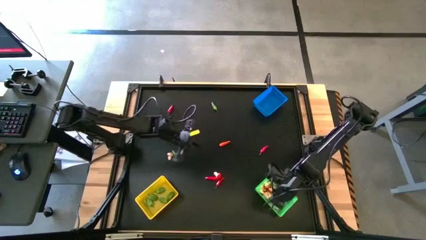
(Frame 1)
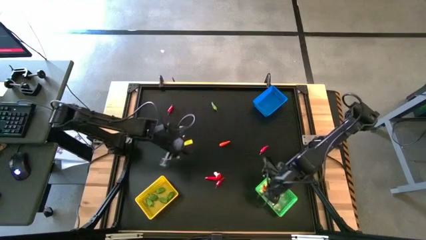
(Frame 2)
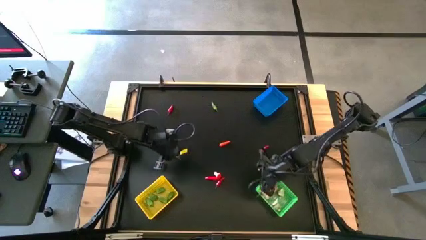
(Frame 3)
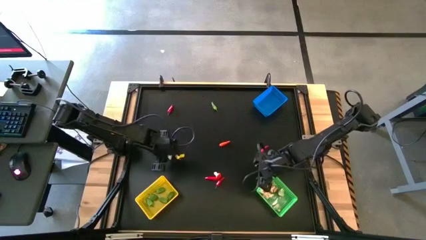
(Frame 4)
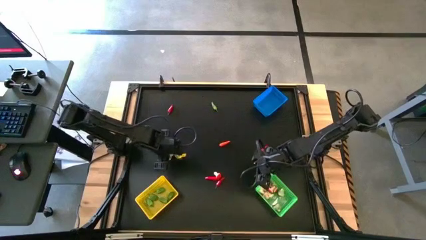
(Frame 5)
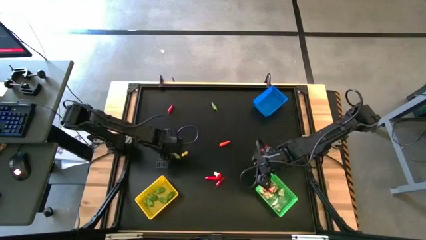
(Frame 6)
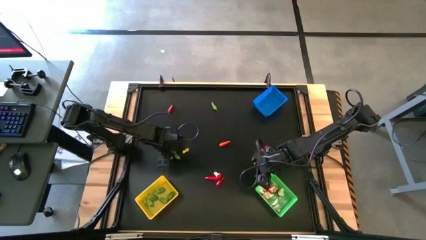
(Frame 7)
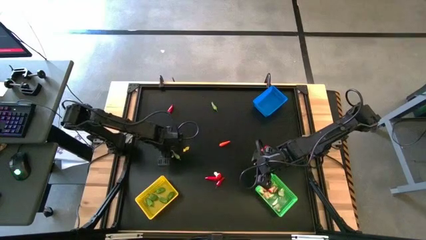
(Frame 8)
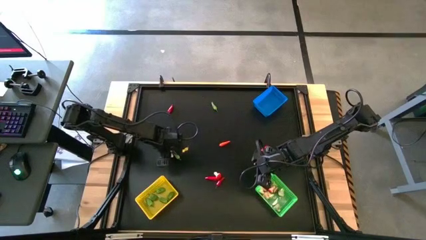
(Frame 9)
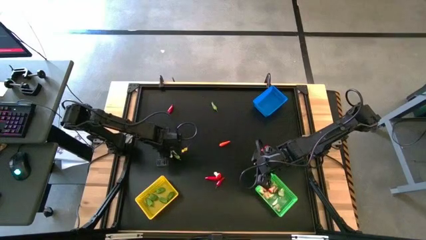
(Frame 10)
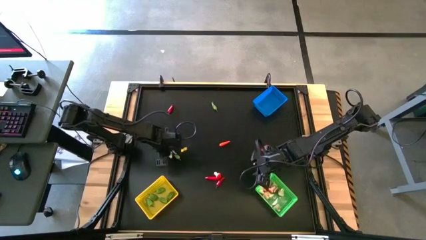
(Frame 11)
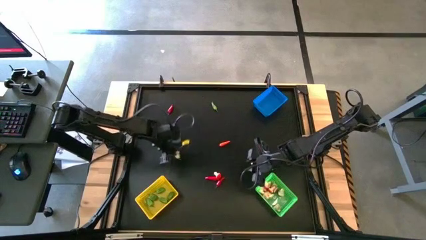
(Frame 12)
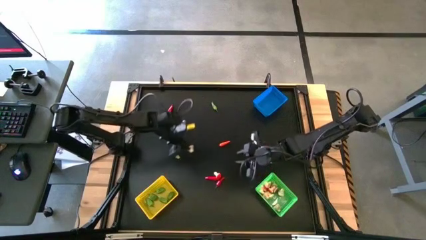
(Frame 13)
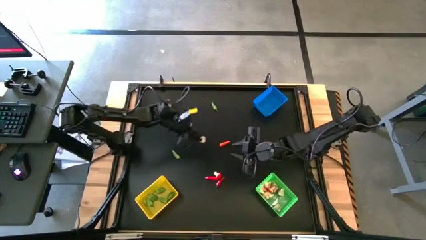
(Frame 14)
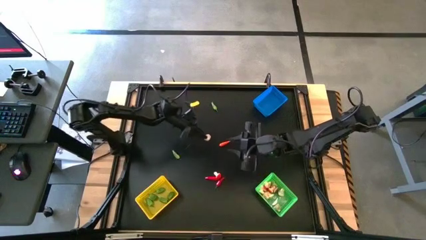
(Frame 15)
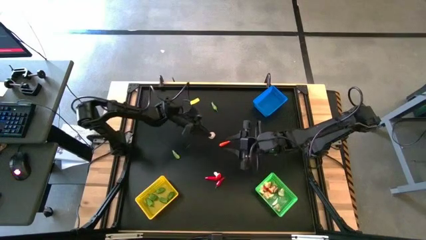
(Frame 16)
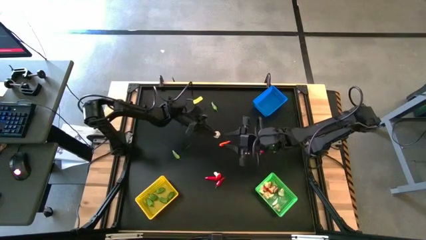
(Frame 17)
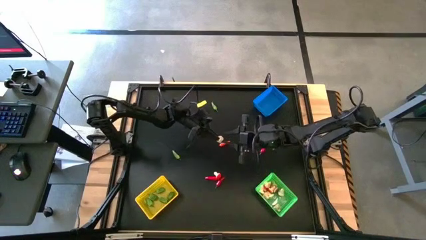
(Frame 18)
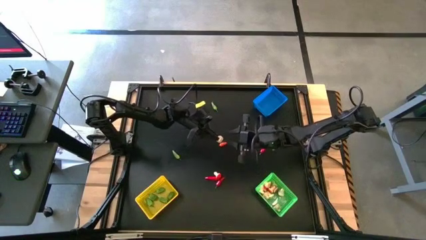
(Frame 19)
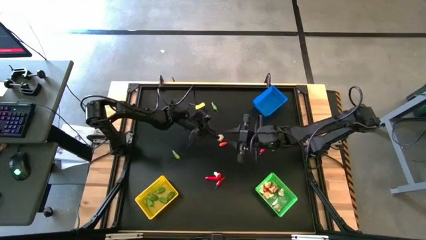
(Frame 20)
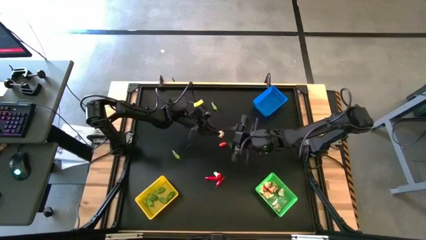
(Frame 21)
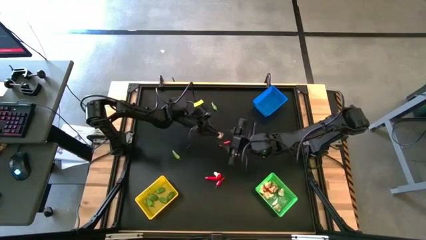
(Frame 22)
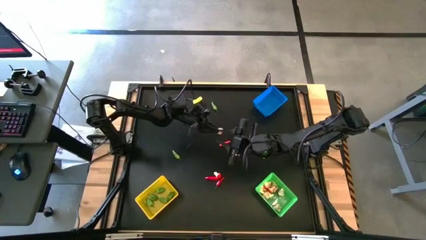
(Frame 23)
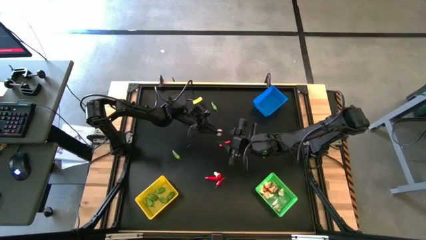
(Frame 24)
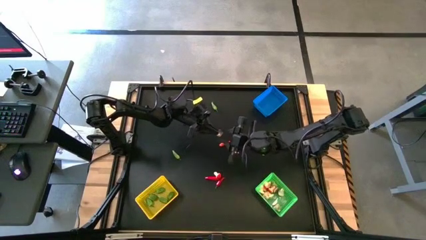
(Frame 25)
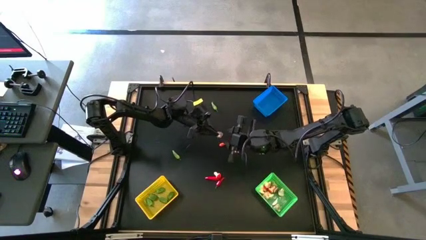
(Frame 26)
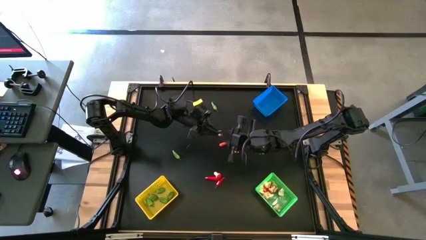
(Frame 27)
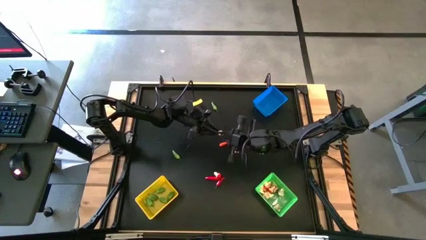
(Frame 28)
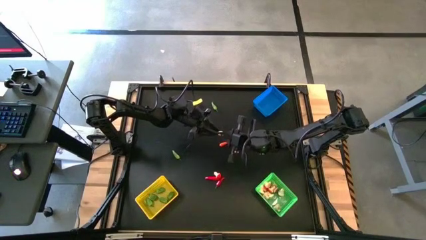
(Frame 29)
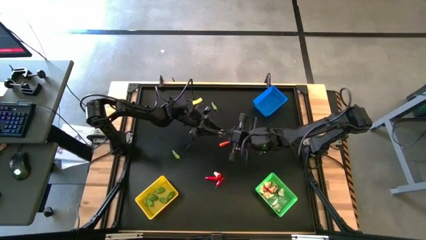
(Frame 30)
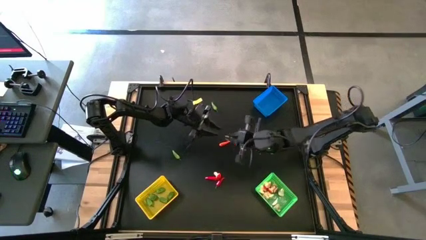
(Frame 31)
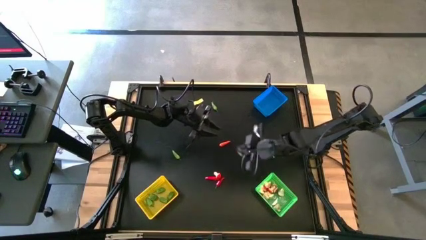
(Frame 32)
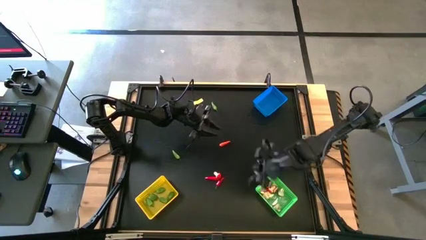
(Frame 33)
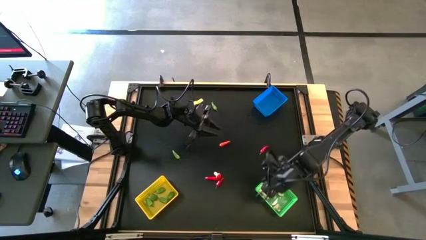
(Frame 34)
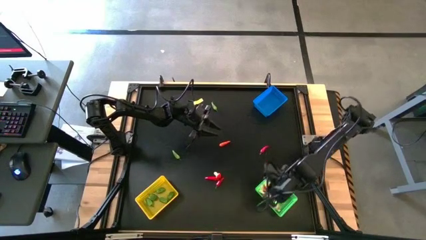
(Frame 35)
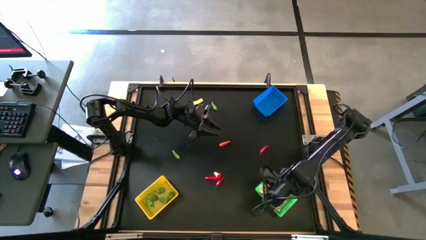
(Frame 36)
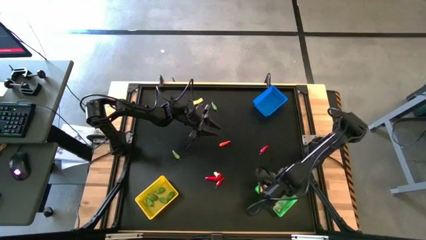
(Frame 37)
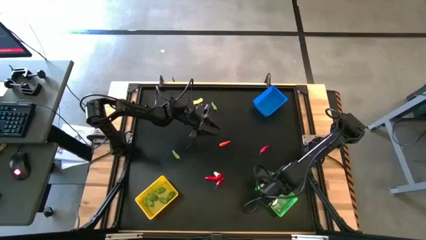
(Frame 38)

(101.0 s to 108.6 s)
Task: Sort produce into baskets
Put the red mushroom into the green bin

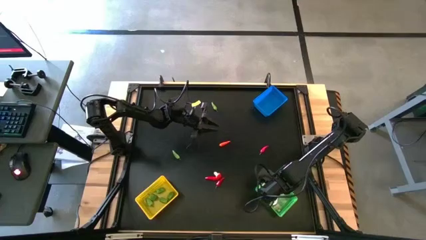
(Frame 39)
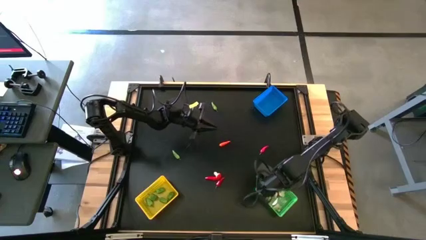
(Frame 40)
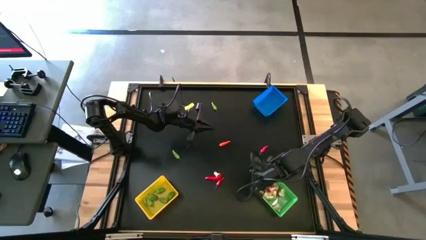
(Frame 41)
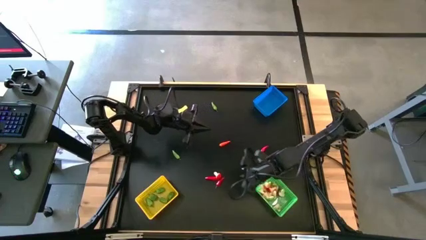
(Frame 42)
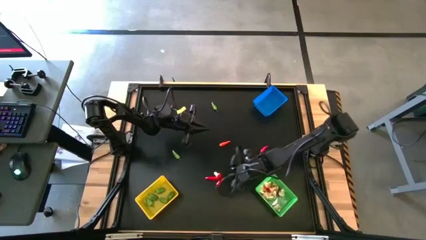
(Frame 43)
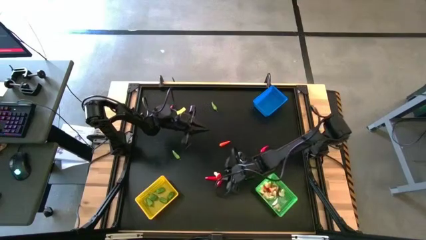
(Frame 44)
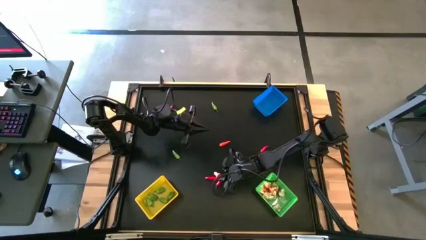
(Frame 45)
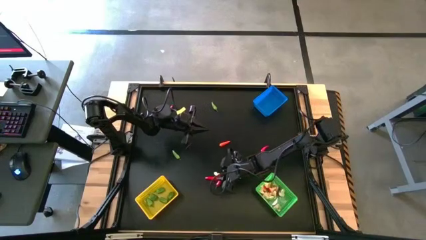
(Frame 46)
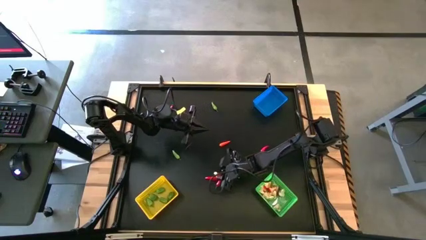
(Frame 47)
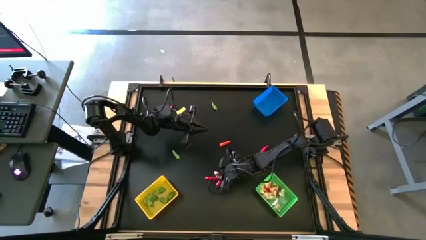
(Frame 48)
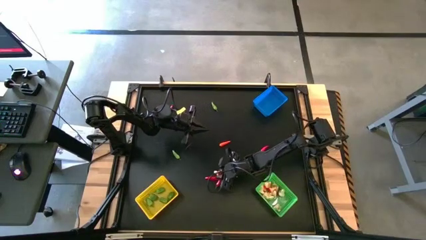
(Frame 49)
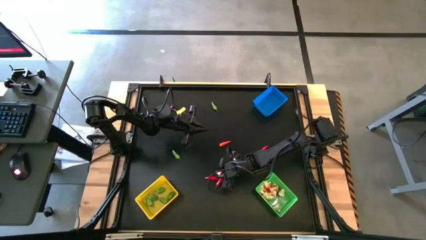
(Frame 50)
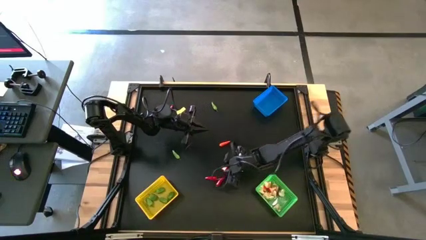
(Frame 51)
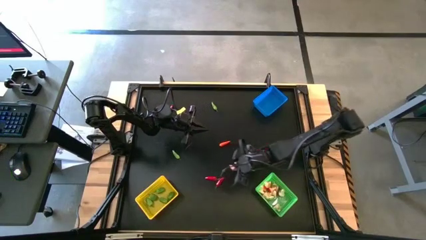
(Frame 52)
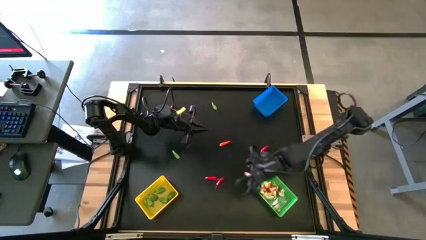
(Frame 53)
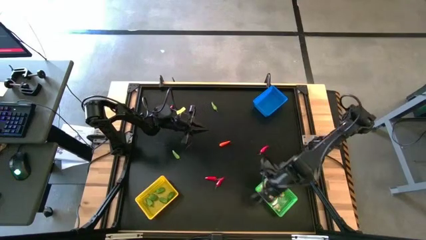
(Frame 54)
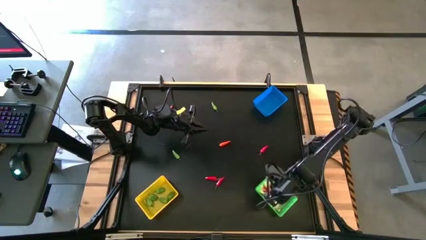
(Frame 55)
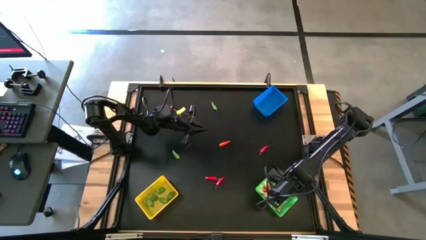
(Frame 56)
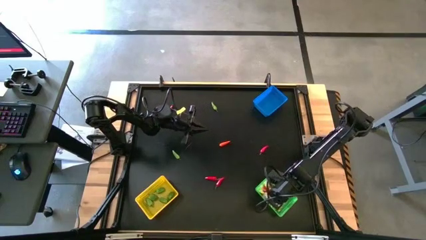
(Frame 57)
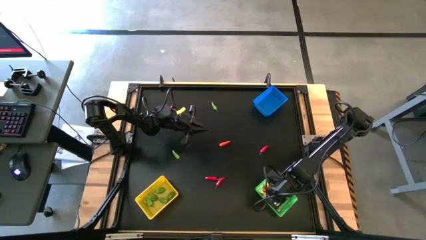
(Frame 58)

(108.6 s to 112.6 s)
Put the red mushroom into the green bin

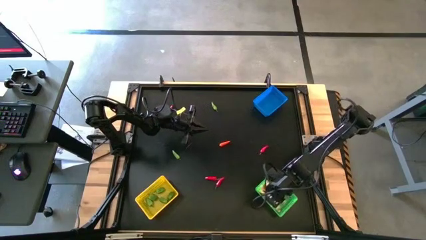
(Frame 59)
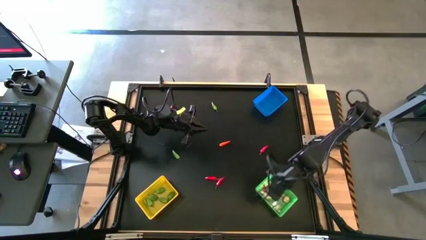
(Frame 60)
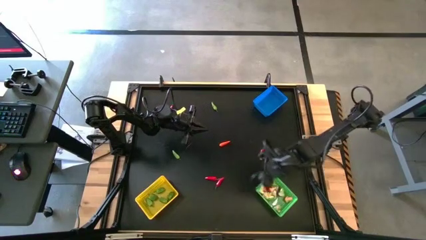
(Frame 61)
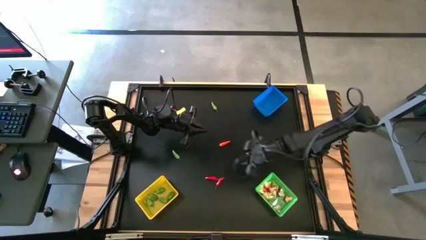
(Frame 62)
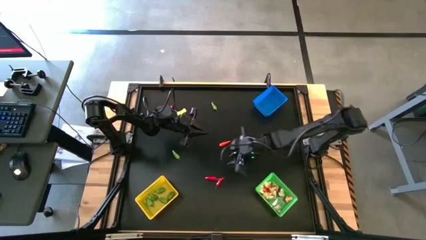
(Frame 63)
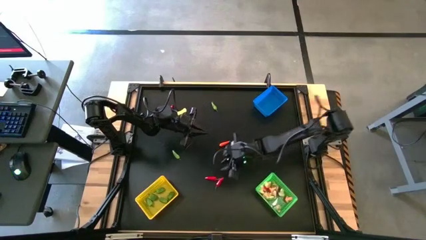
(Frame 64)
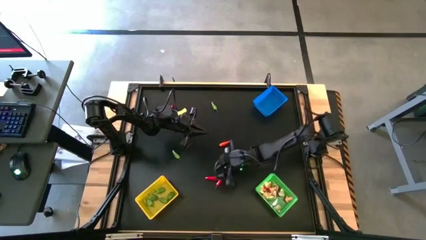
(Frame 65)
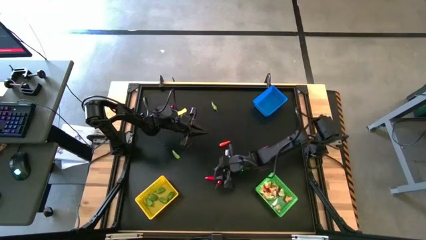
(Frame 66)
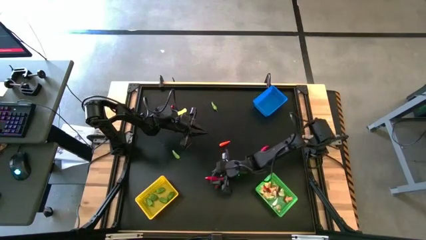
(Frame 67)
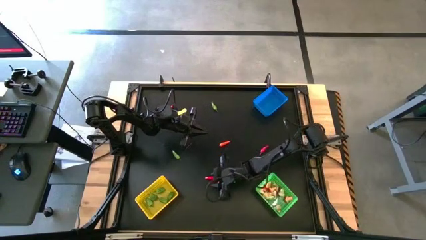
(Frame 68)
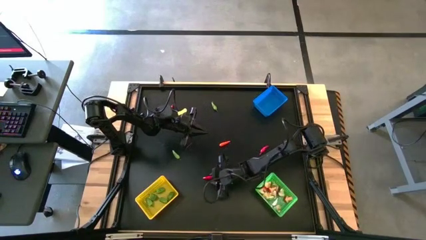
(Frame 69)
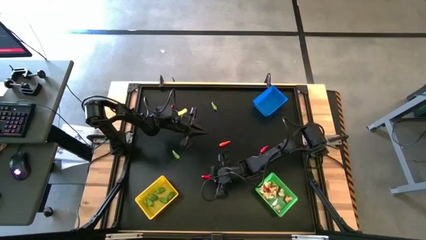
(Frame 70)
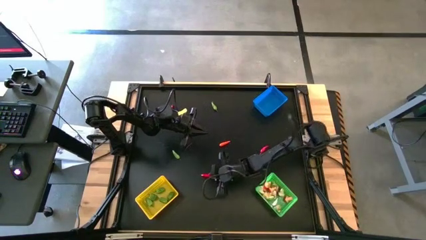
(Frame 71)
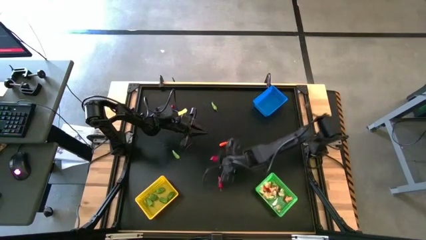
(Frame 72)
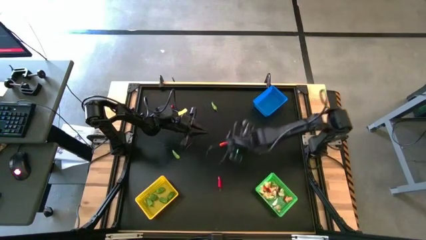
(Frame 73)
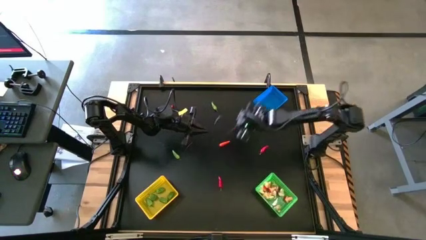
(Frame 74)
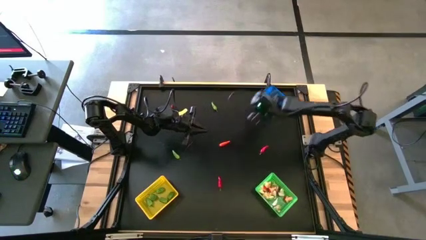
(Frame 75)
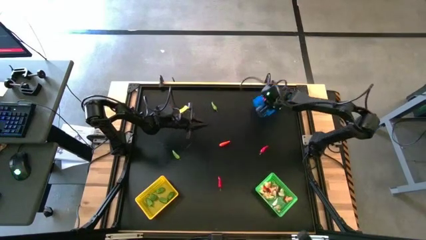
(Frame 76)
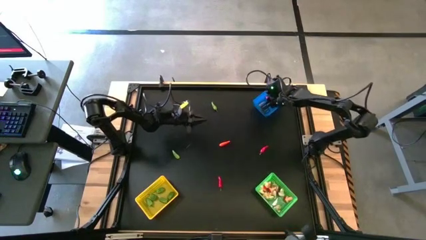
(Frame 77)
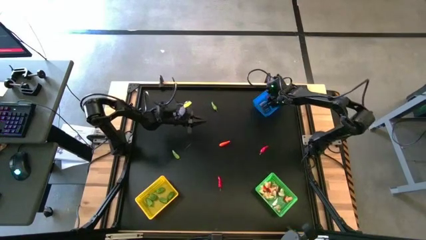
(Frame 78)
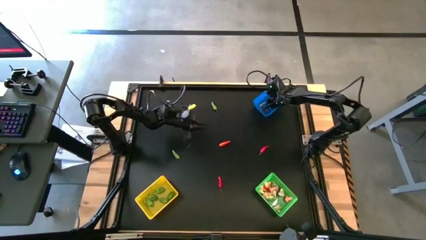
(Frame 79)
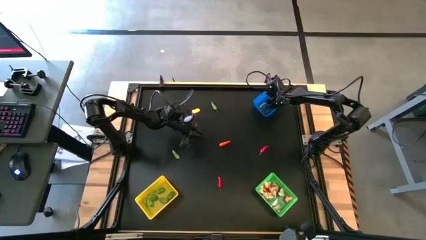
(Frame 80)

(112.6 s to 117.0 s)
Put the red chili pepper into the blue bin

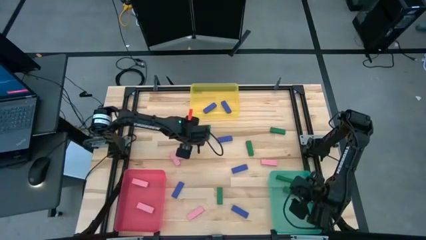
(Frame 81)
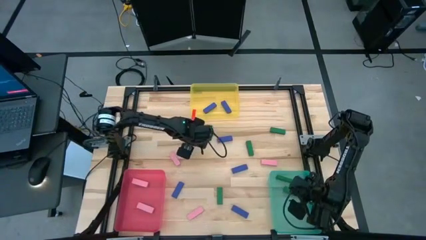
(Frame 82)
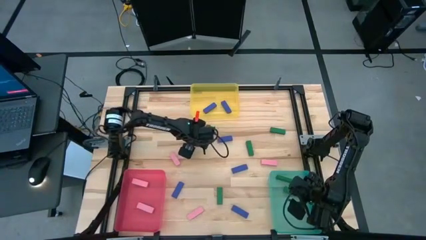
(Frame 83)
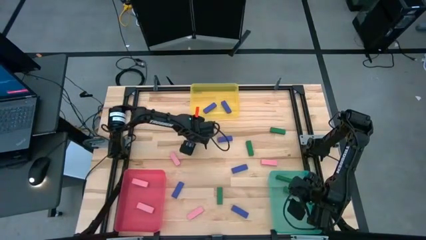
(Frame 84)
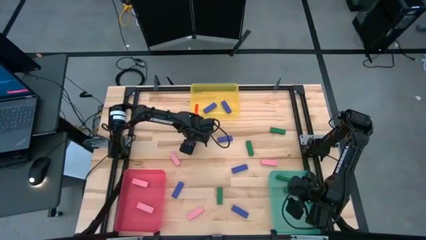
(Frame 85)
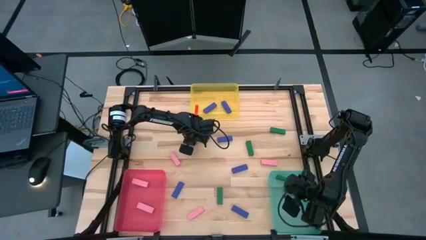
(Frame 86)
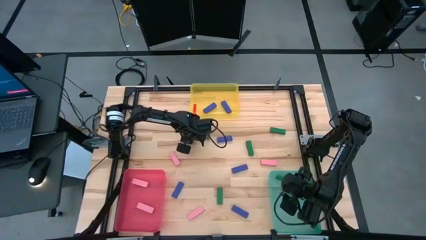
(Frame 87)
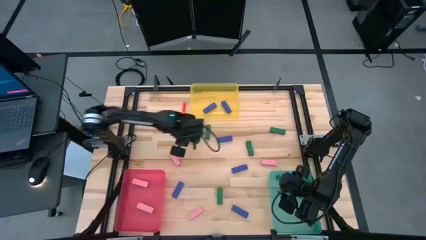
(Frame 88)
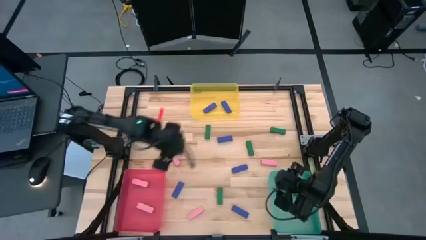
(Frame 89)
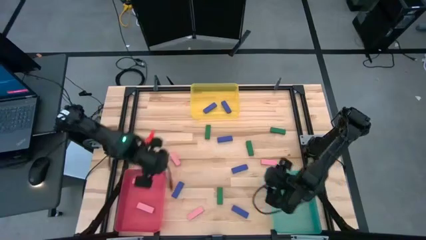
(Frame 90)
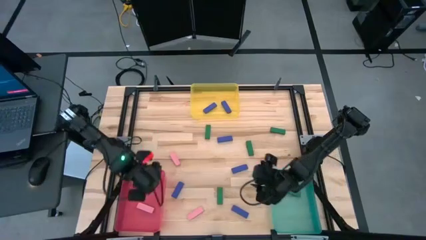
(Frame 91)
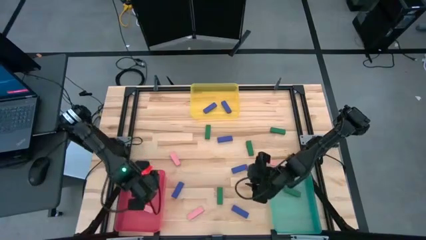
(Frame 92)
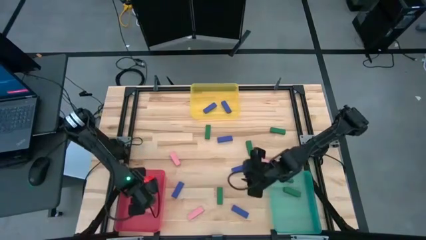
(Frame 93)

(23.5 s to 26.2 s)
Task: Sort blocks
Put the pink block into the red bin
